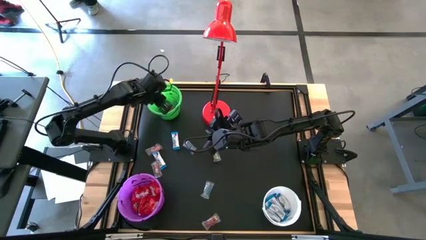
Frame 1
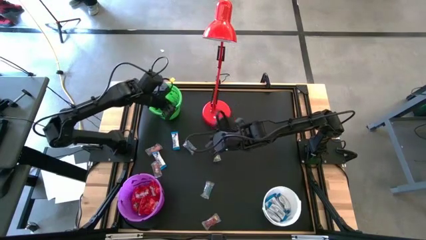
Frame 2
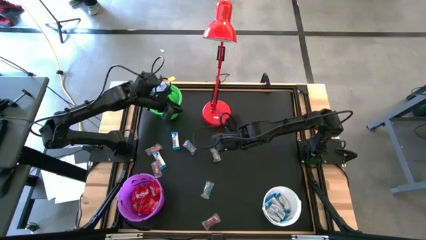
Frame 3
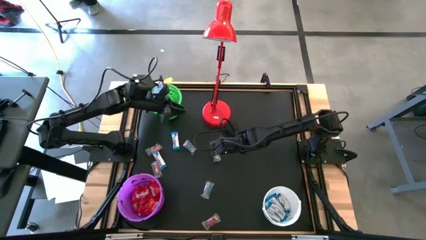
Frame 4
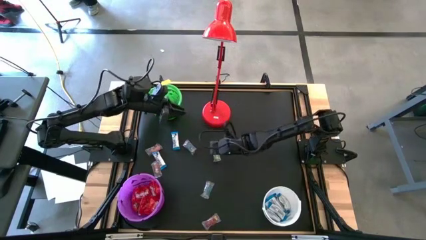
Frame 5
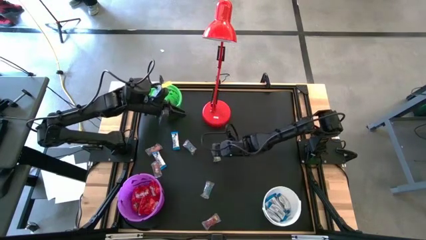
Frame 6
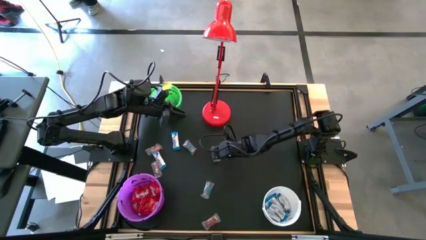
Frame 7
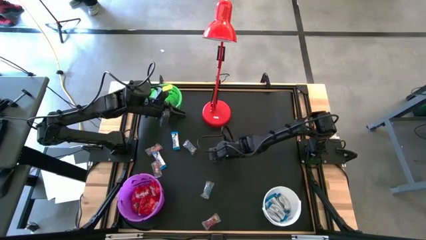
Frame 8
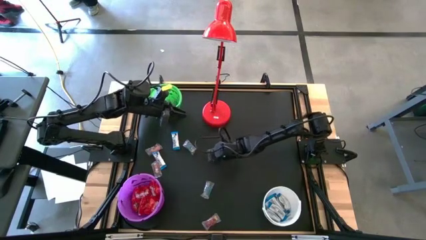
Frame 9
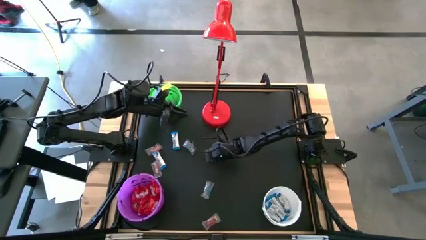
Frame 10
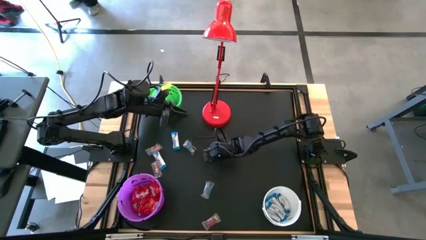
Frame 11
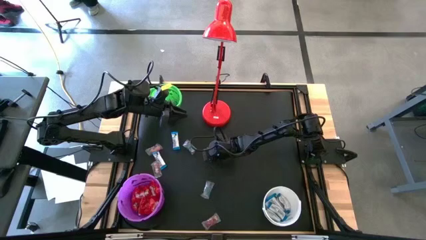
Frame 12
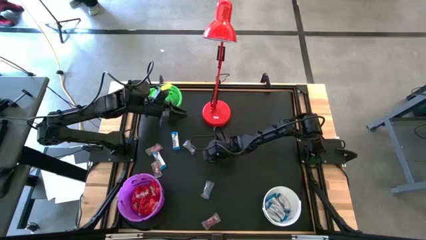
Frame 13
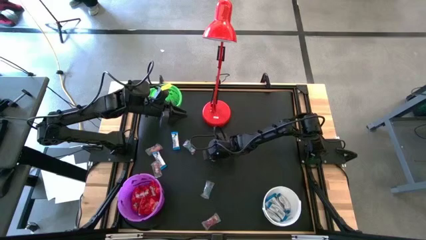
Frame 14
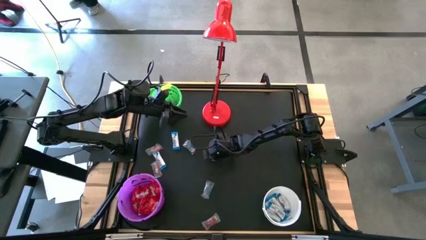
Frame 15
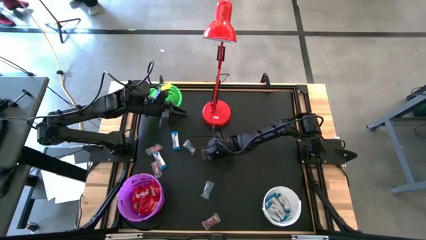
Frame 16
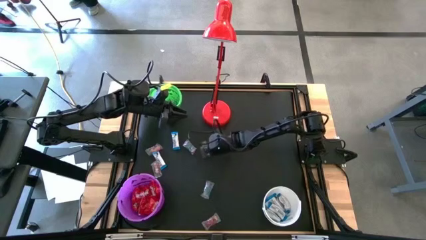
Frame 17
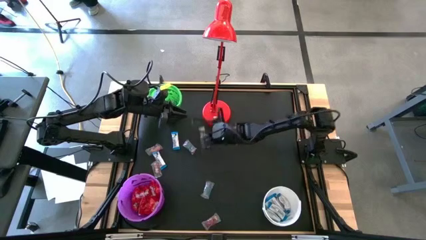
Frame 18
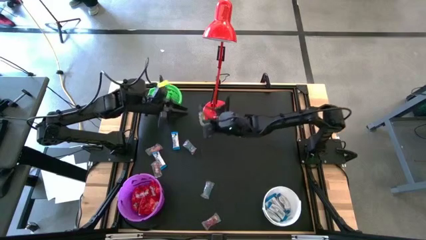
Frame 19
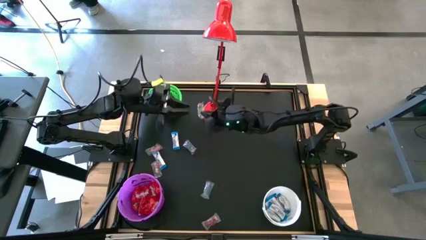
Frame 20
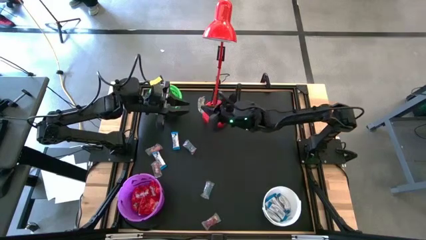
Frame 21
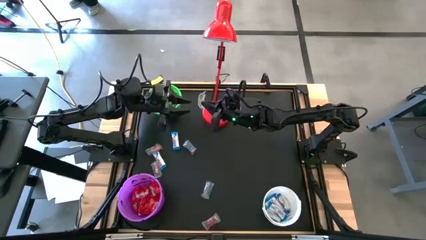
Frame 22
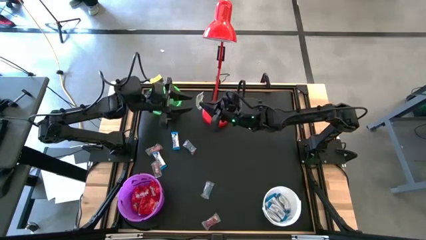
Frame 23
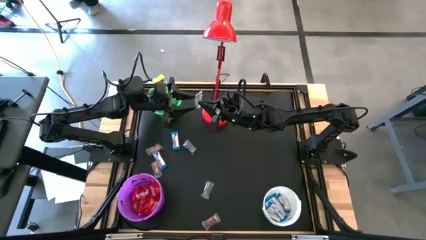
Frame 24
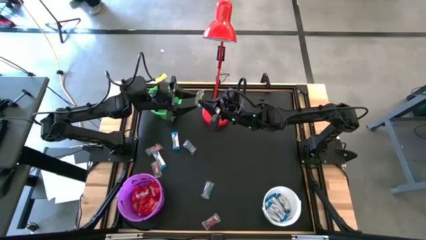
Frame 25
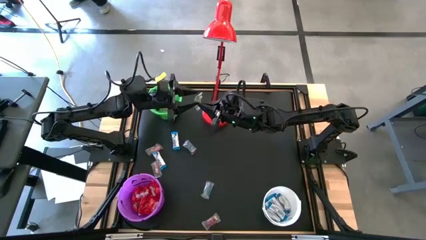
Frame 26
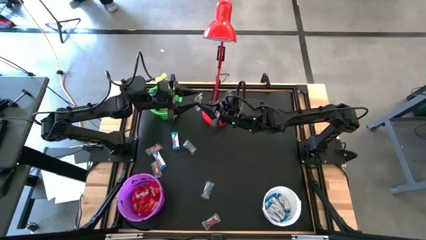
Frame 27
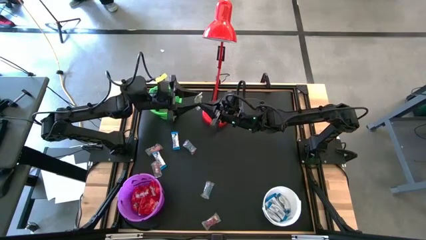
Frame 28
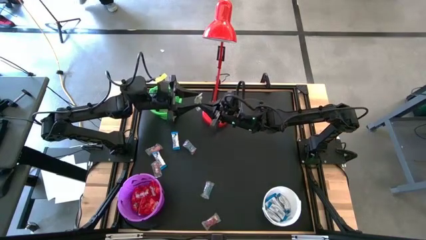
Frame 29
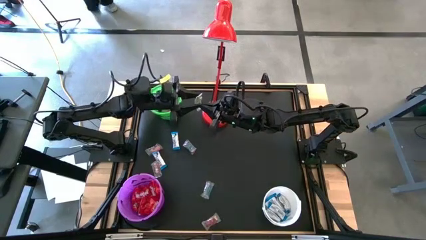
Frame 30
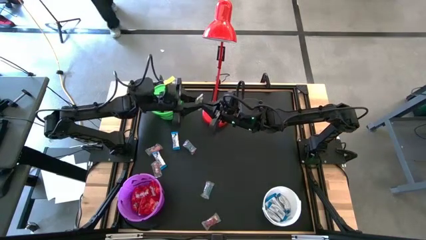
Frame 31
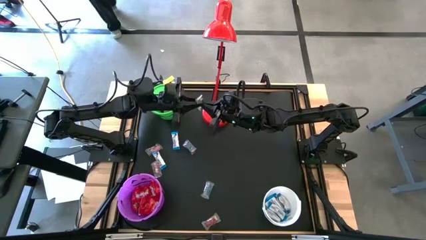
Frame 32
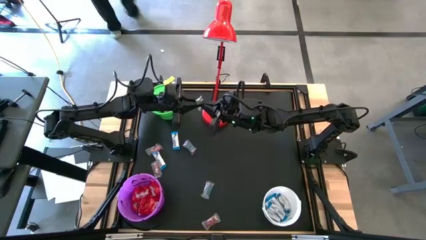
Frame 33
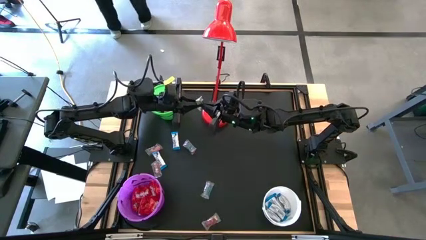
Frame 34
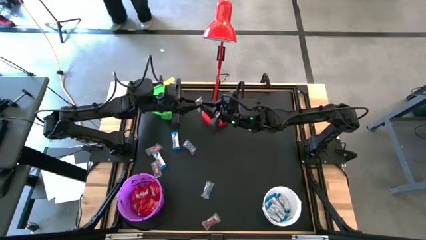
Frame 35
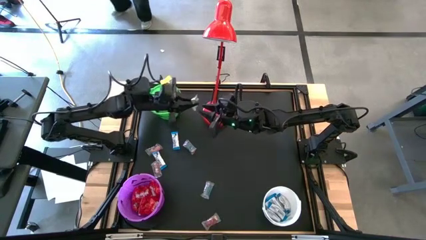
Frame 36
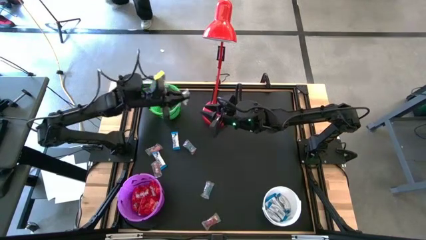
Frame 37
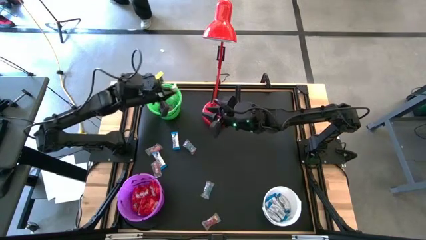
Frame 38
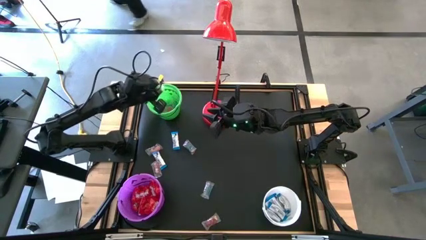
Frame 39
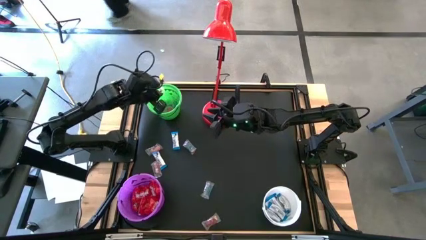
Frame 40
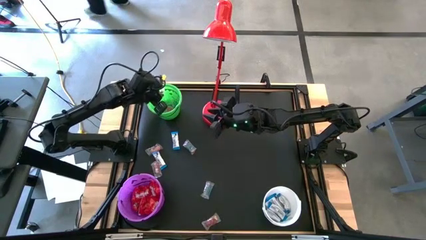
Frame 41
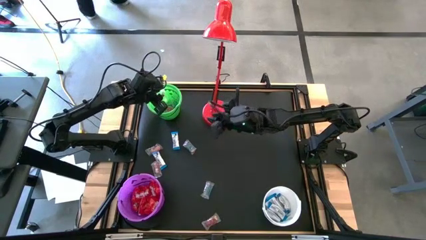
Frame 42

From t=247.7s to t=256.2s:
Task: Sort candy
Put the green gummy into the green bucket

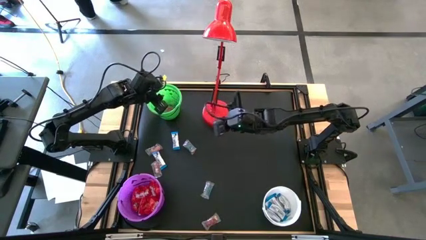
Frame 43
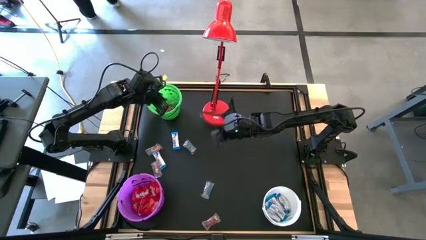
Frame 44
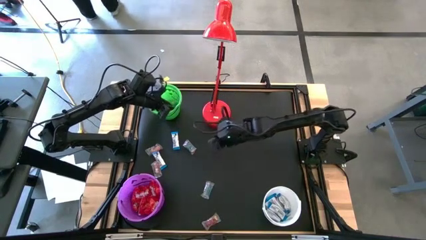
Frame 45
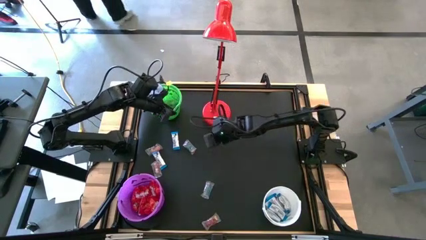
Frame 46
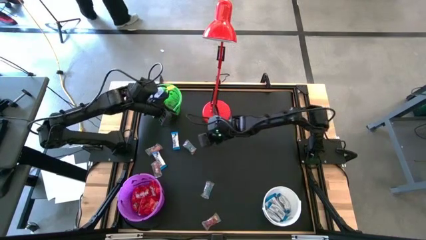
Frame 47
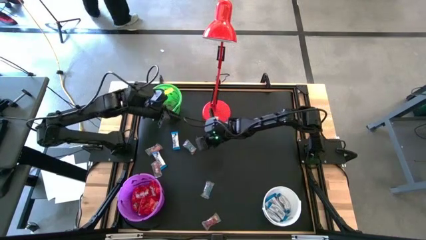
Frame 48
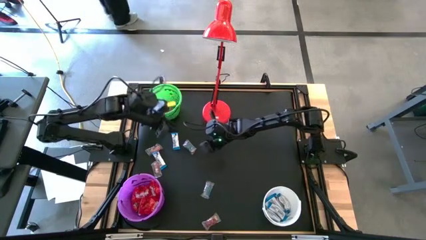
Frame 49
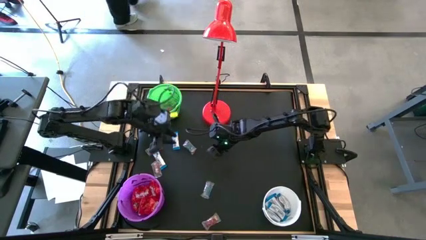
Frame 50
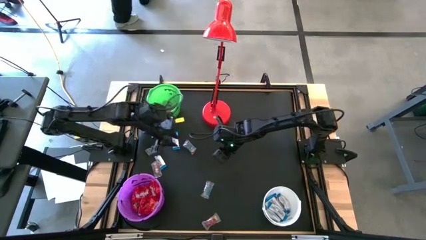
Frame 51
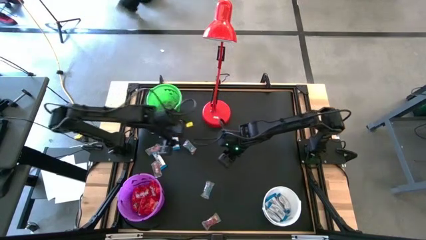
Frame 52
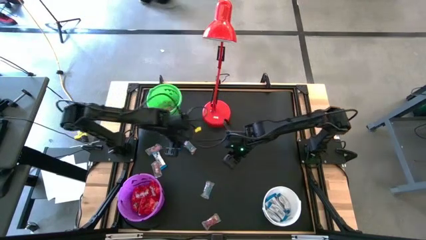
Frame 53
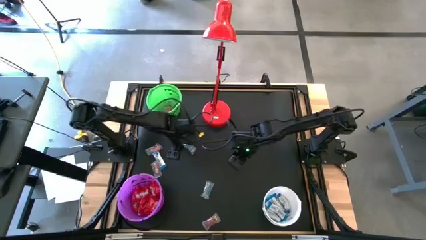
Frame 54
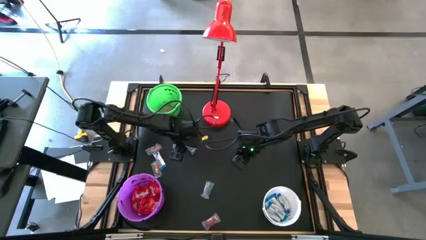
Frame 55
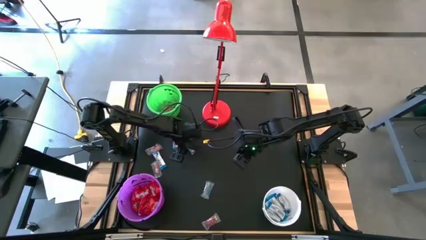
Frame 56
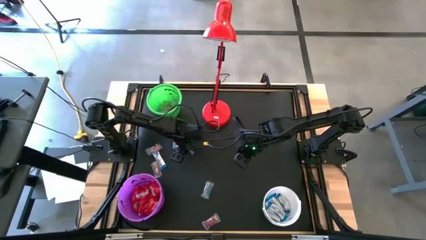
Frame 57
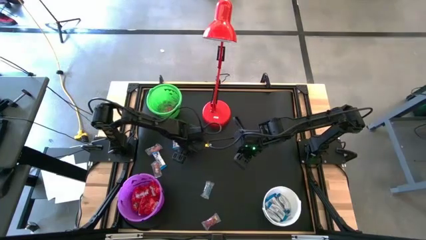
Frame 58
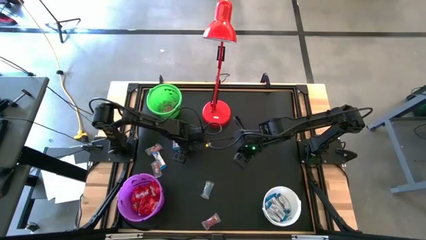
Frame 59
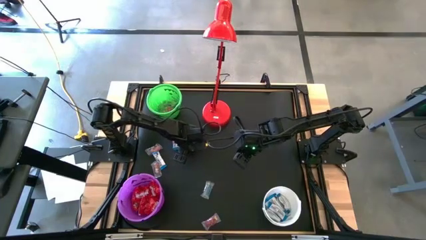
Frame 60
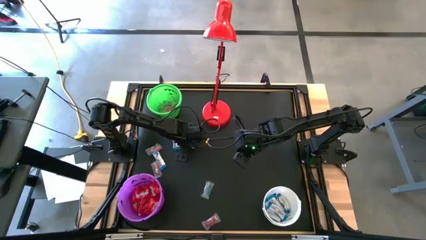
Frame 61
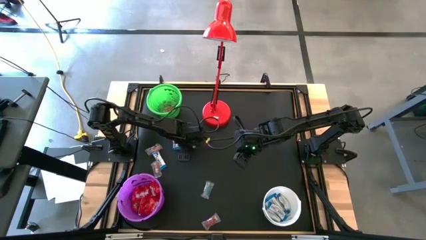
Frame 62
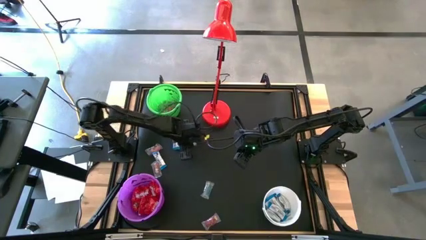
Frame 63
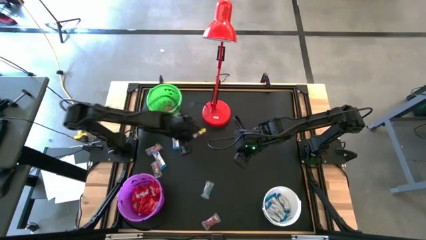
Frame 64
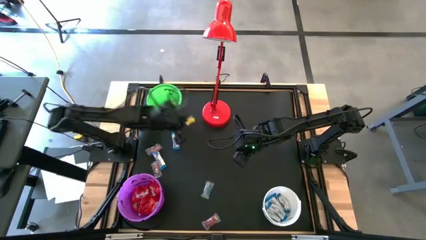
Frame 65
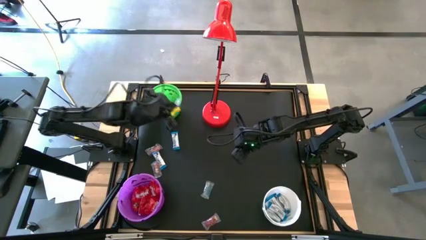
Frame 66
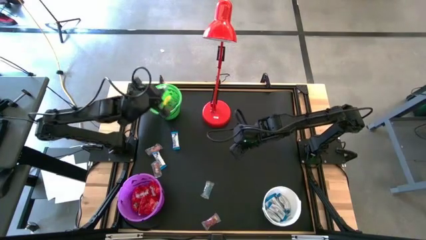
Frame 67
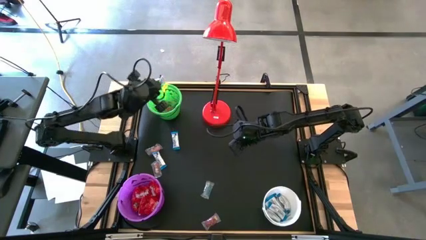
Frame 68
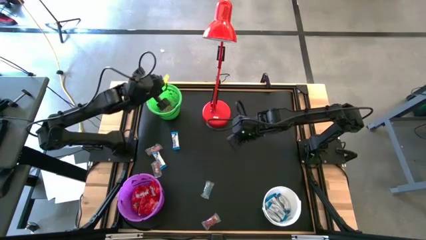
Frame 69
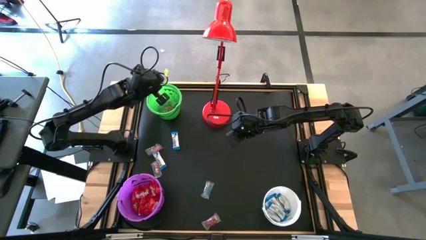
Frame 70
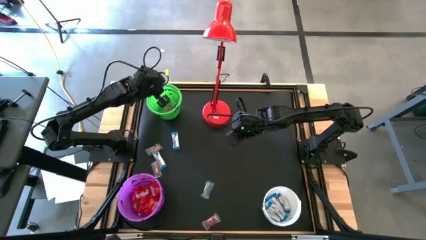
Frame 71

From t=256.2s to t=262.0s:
Put the blue gummy into the green bucket

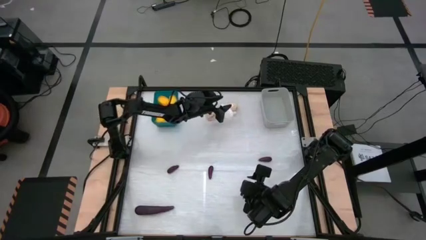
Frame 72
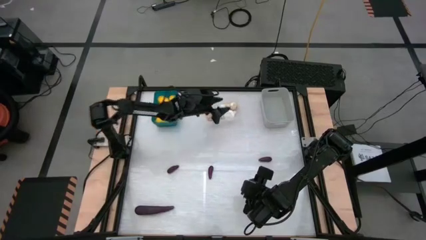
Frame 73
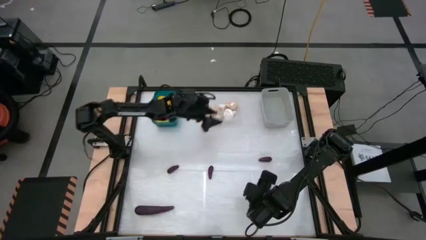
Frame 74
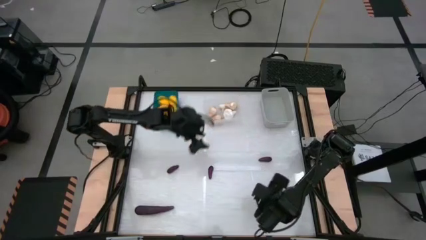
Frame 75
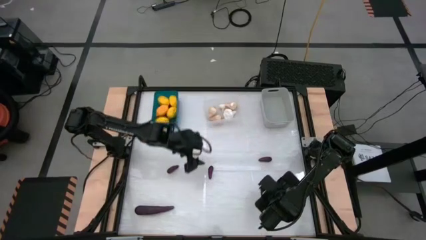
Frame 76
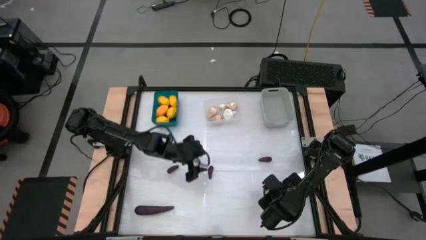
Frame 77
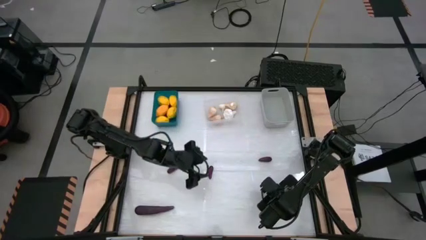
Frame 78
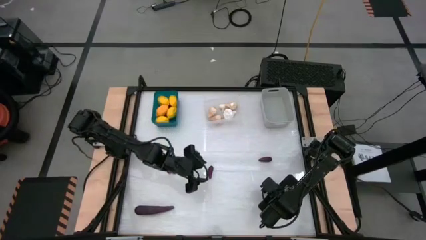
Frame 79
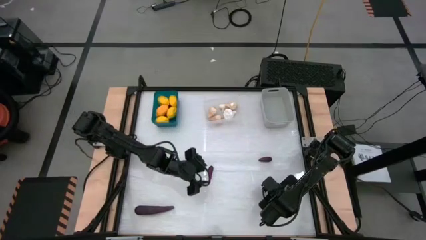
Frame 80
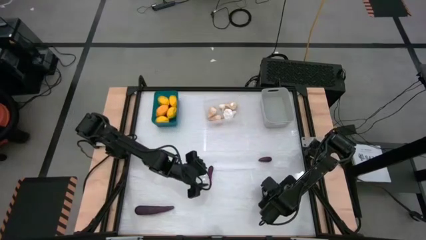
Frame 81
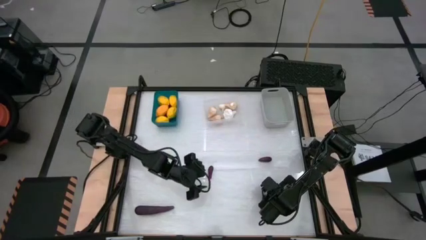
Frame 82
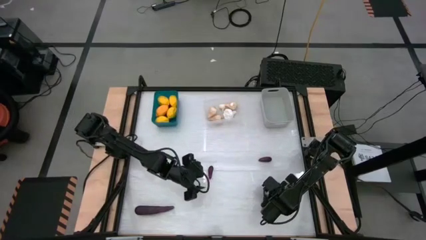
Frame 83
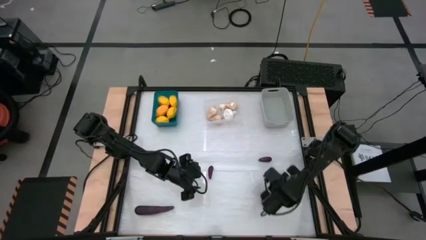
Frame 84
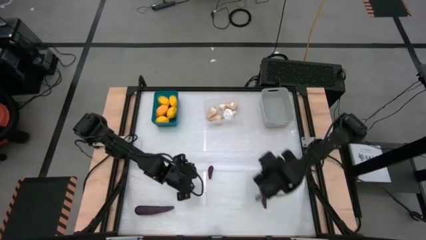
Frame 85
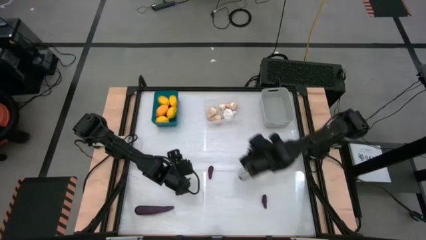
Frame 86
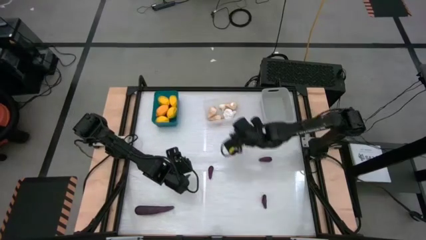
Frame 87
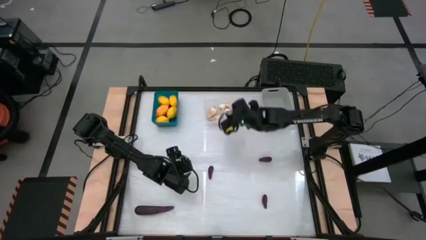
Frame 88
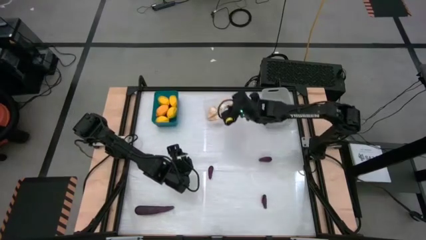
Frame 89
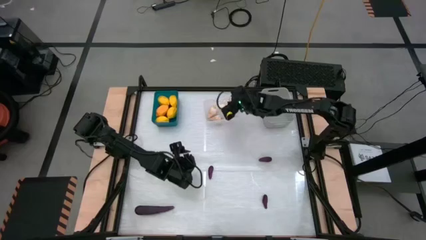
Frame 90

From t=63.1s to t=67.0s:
Task: Sort produce into baskets
Put the garlic into the transparent bin
